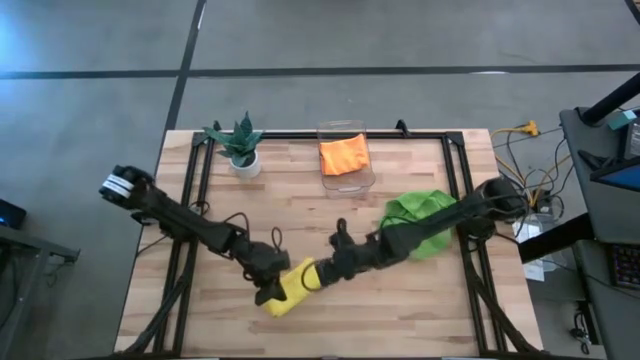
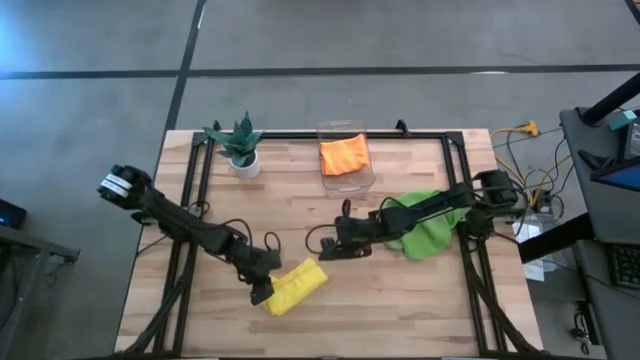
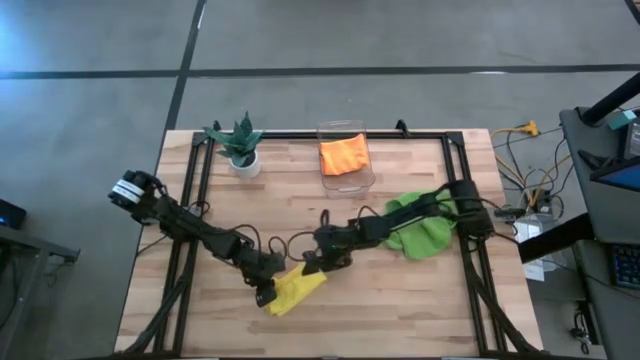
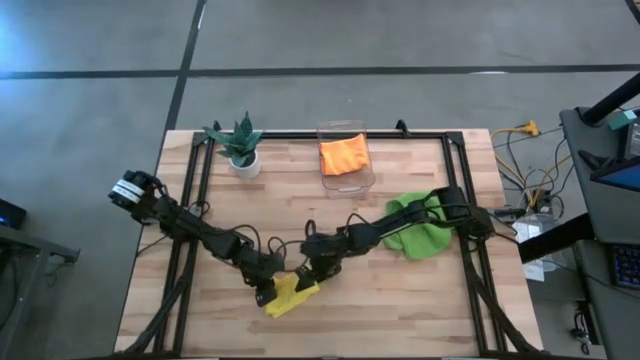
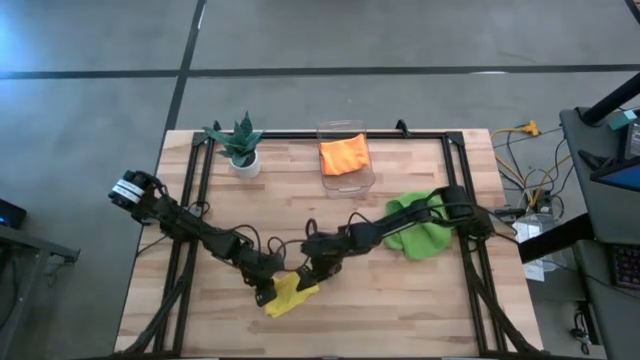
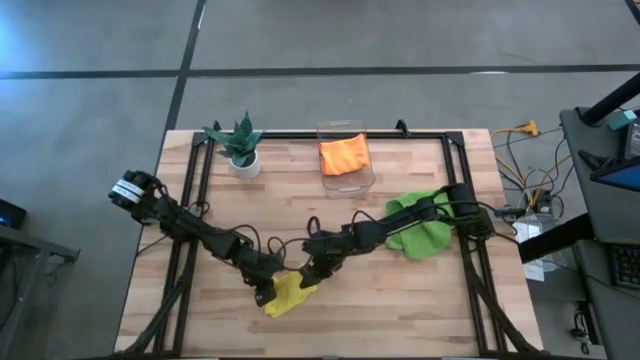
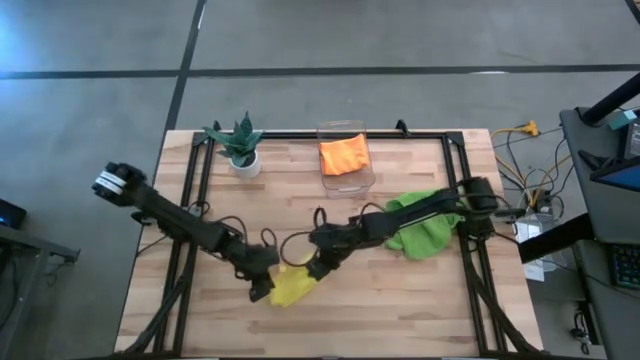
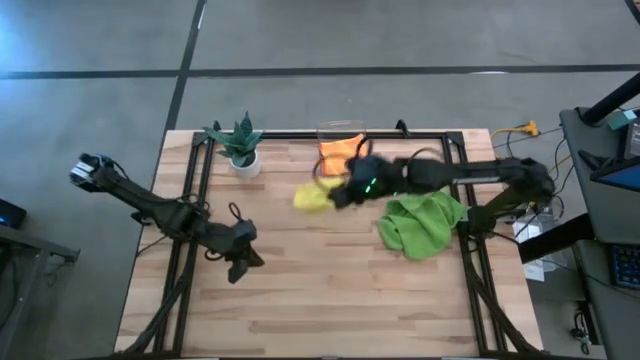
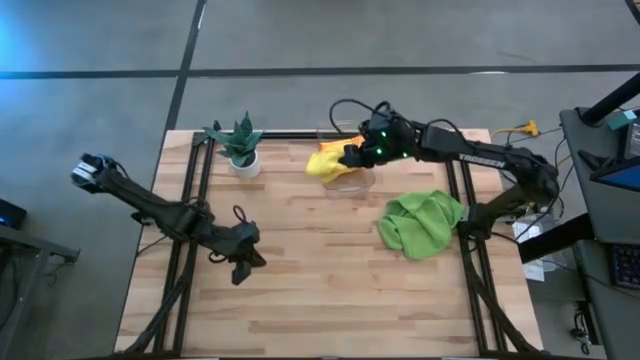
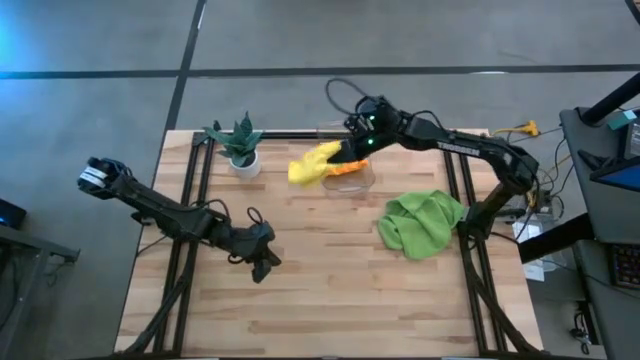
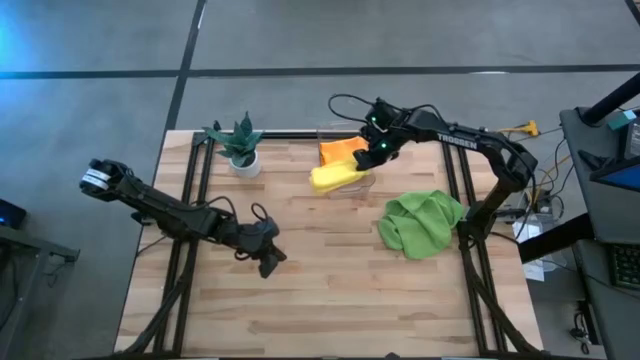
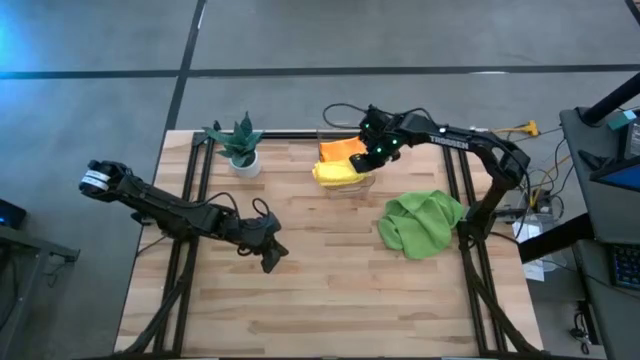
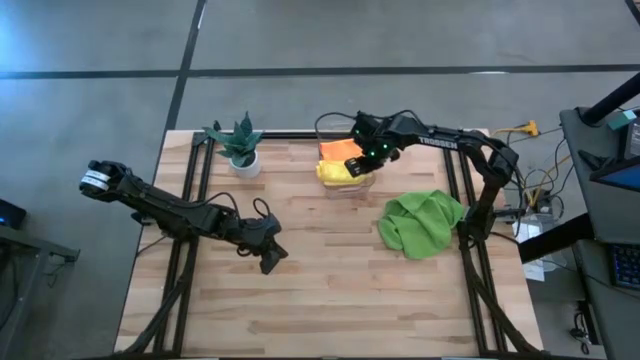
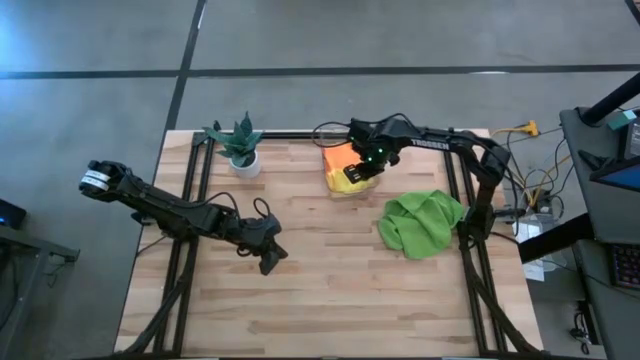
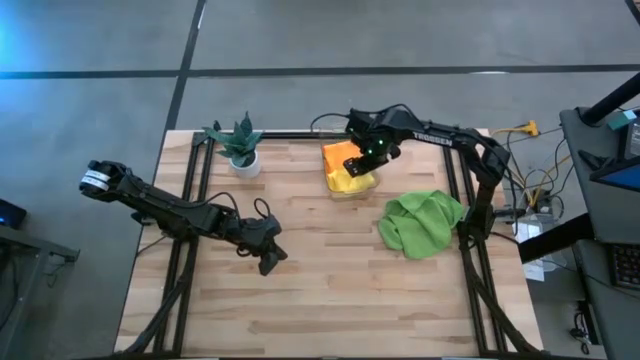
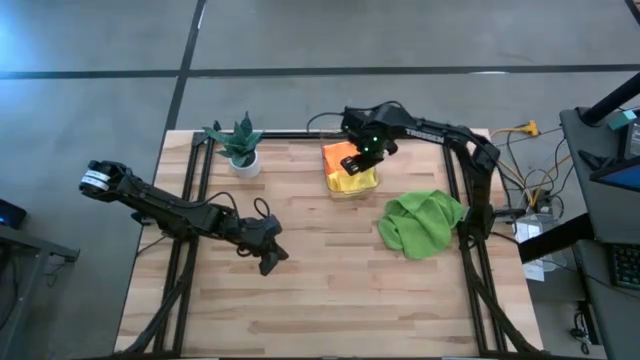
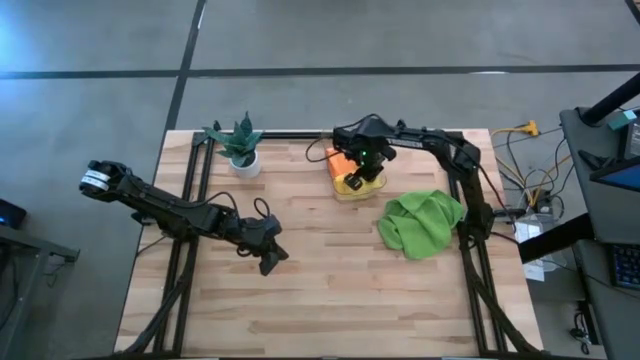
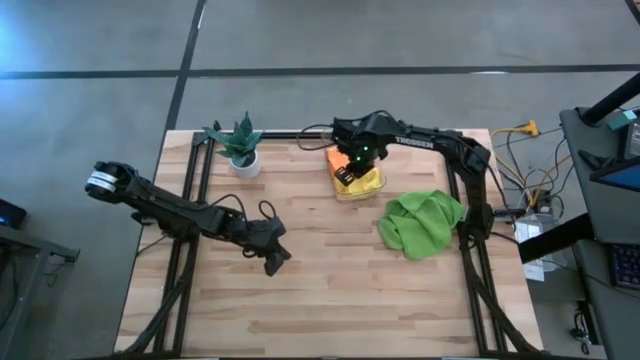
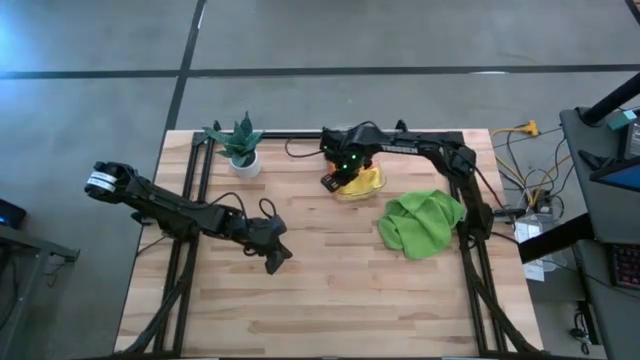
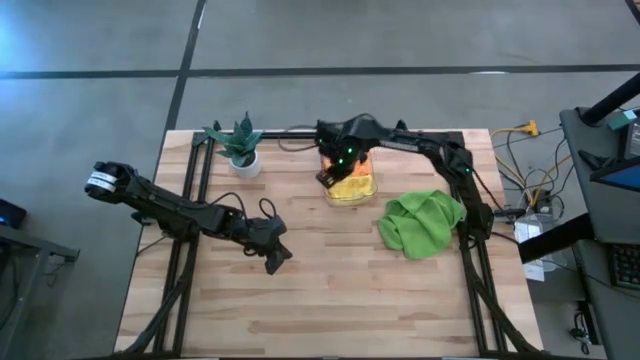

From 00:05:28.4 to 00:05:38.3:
Task: Fold microfiber towels
Put the folded yellow towel into the transparent bin

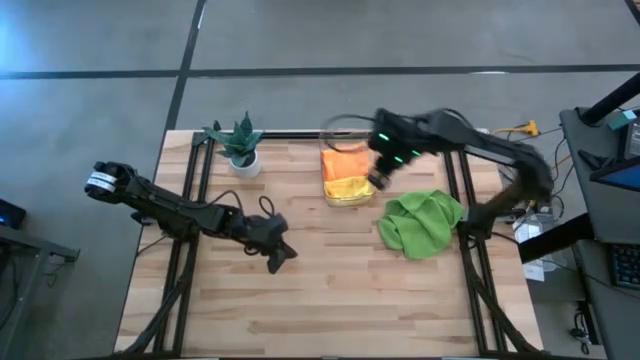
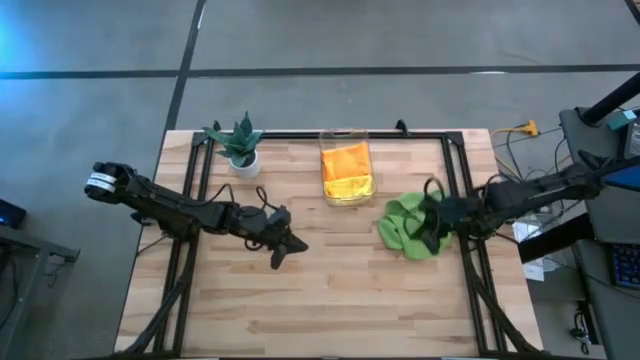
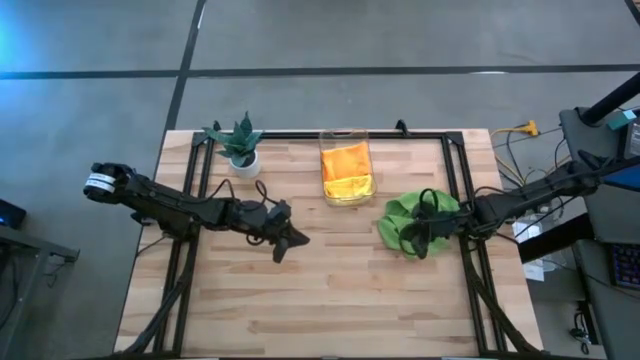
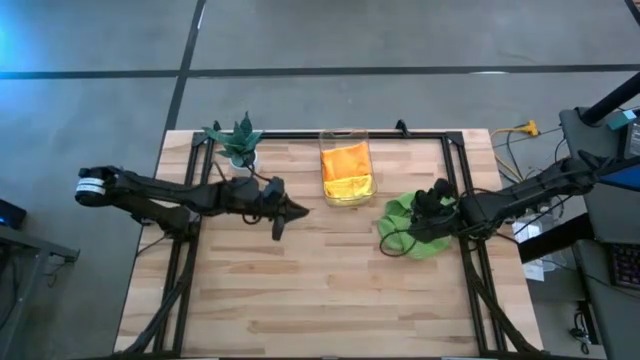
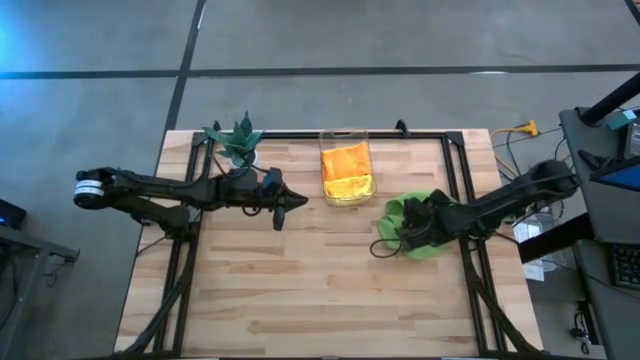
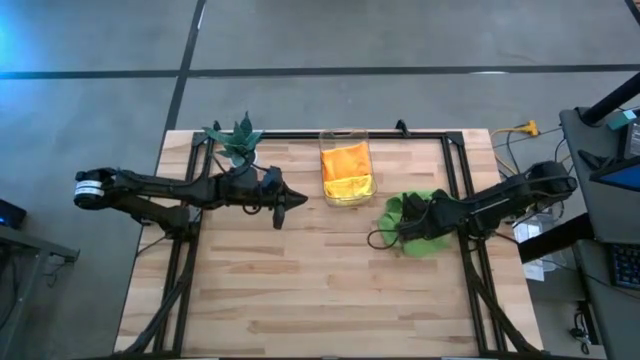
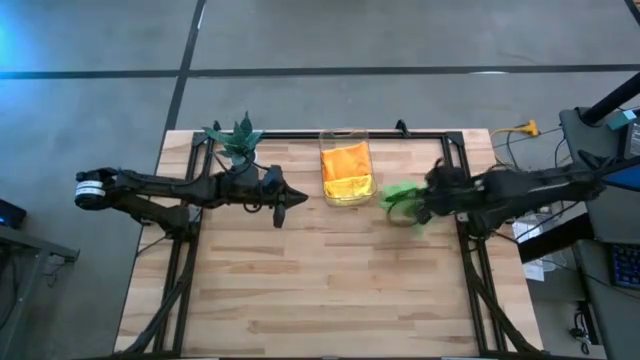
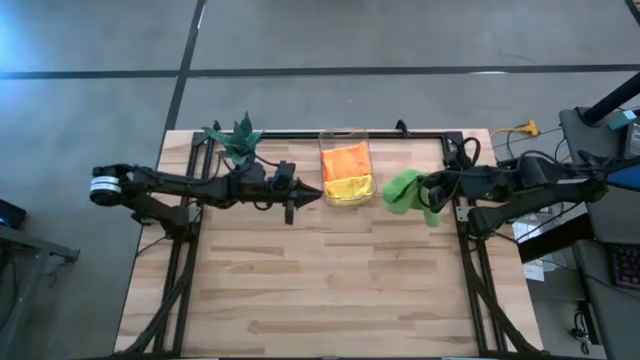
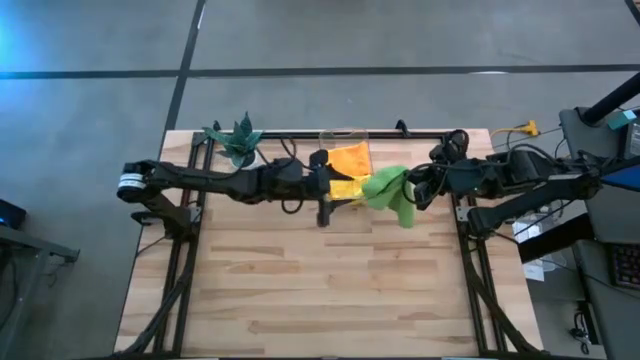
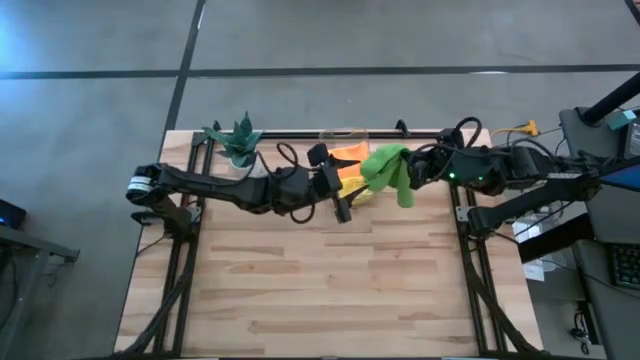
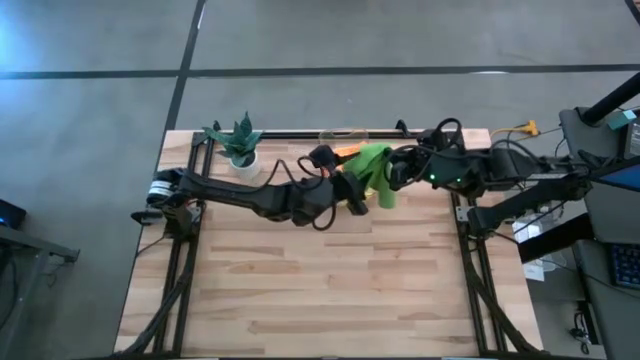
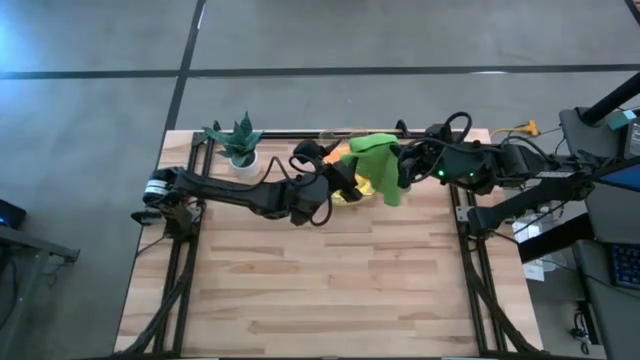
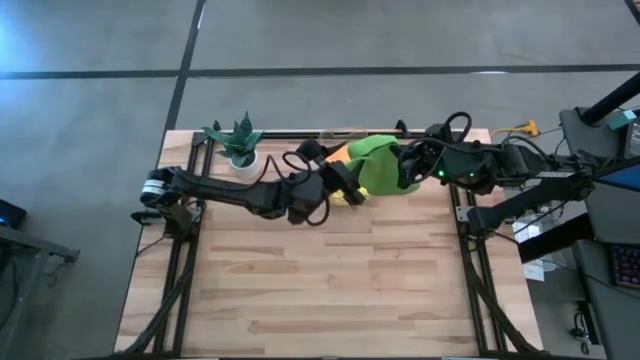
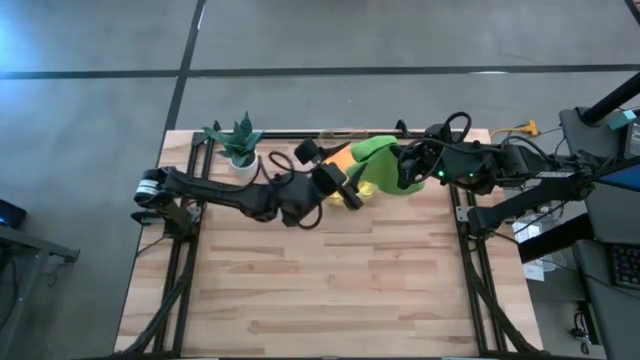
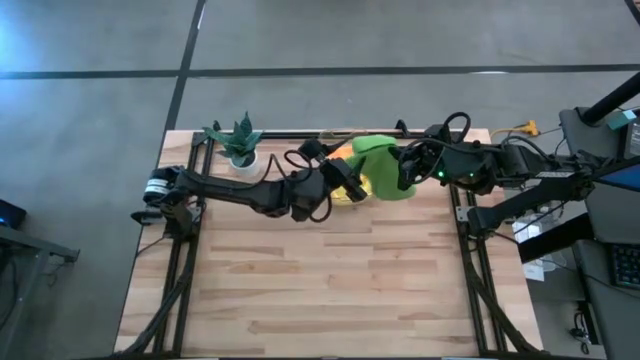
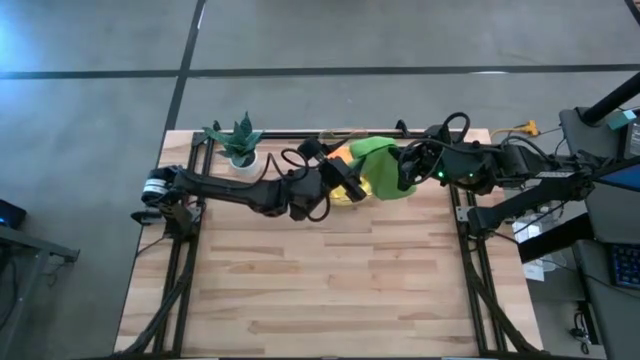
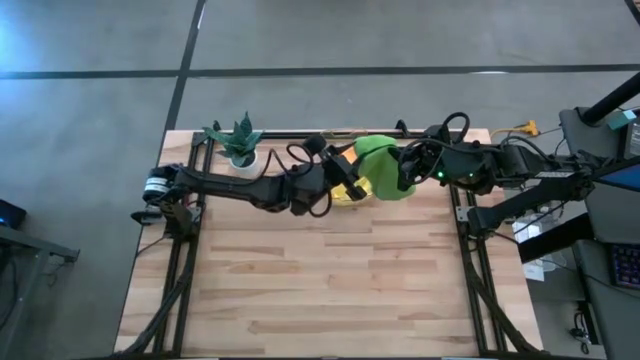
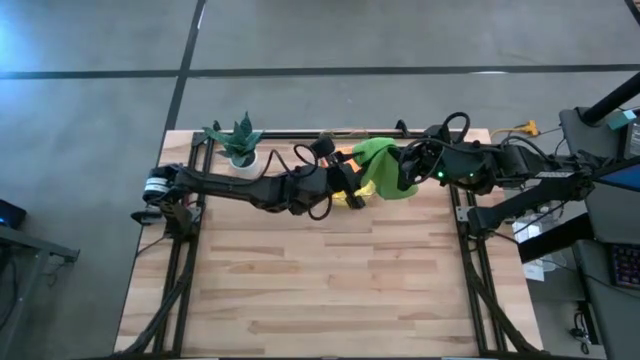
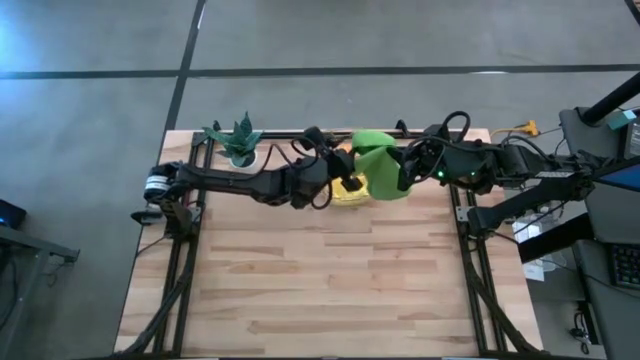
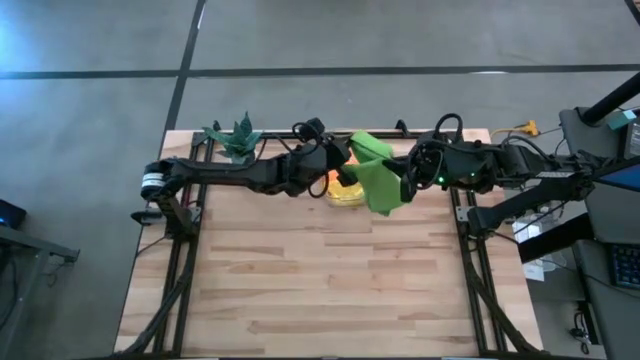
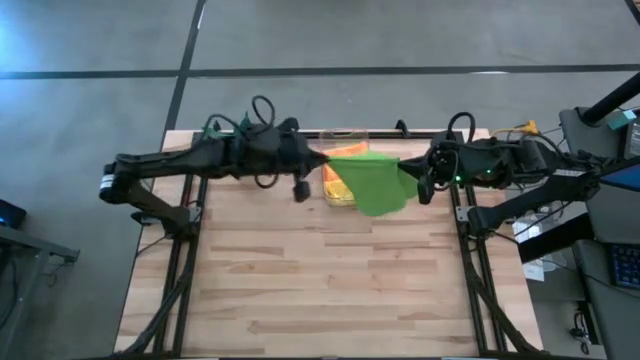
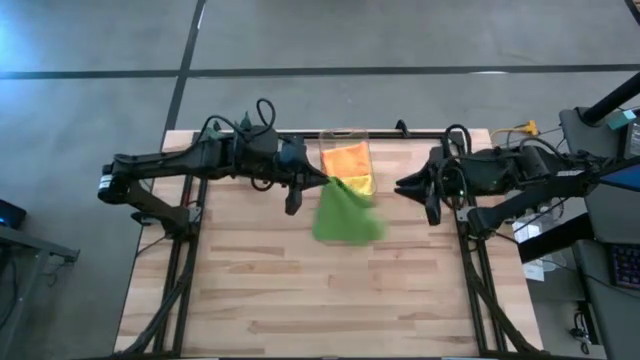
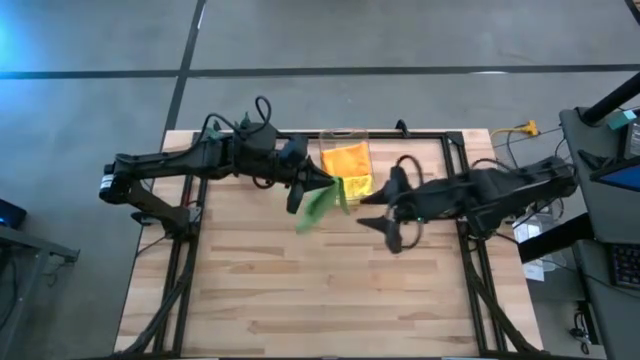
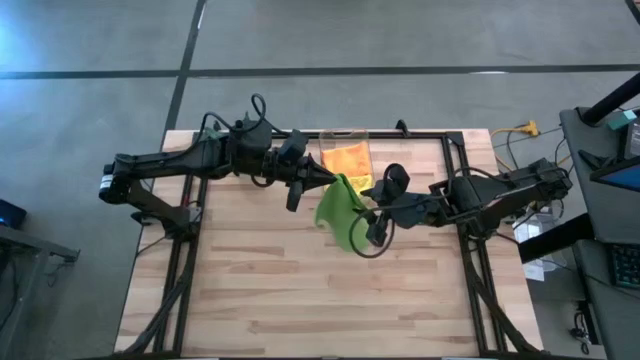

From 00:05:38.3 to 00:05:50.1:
Fold the green towel

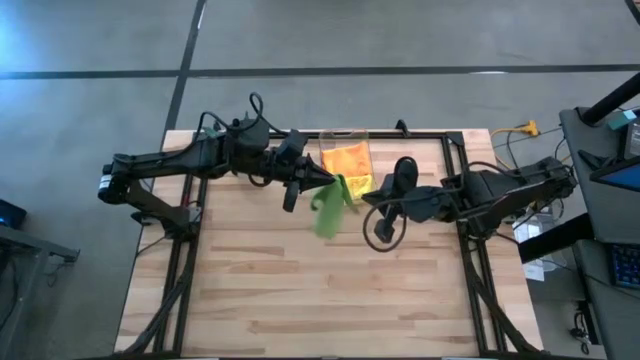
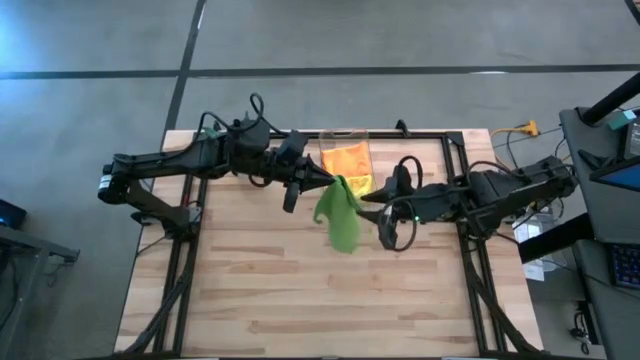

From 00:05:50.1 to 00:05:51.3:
Fold the green towel
